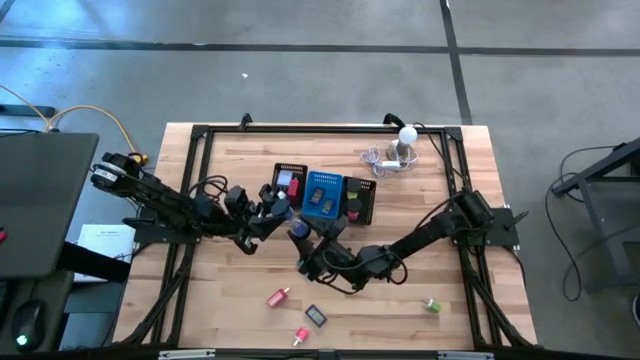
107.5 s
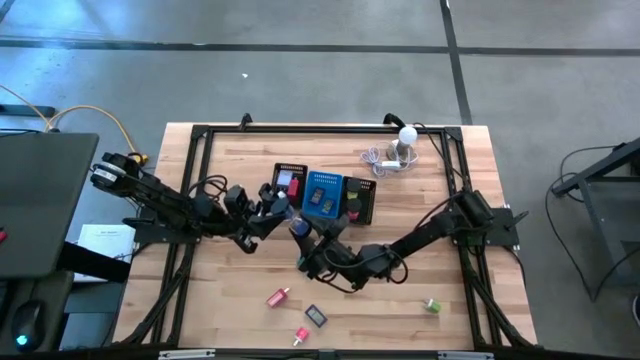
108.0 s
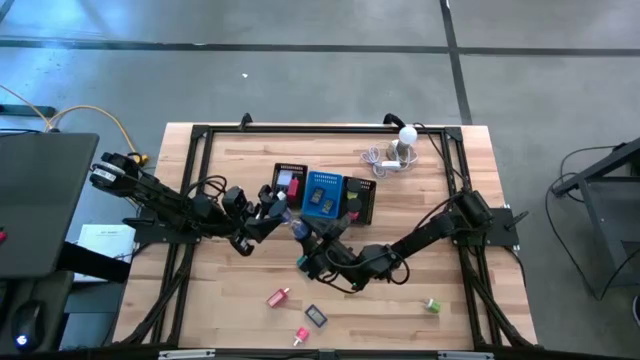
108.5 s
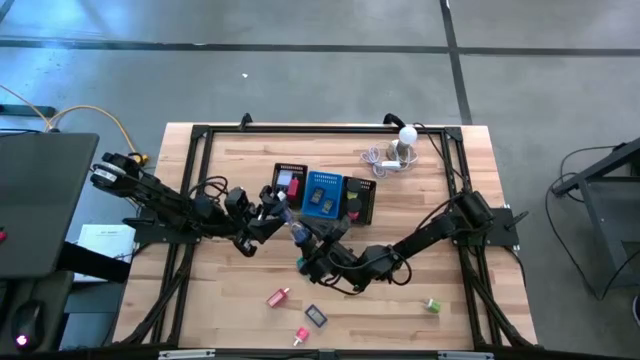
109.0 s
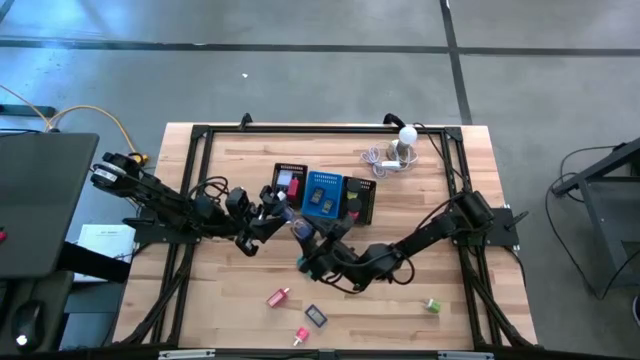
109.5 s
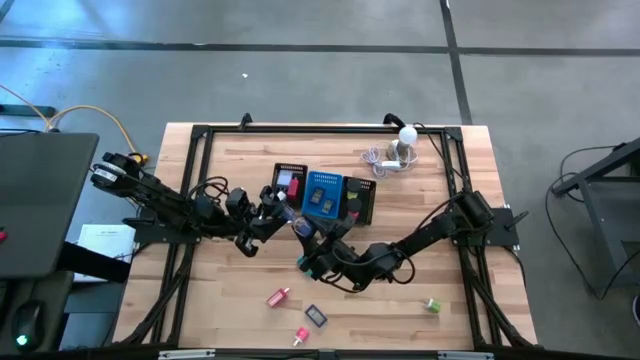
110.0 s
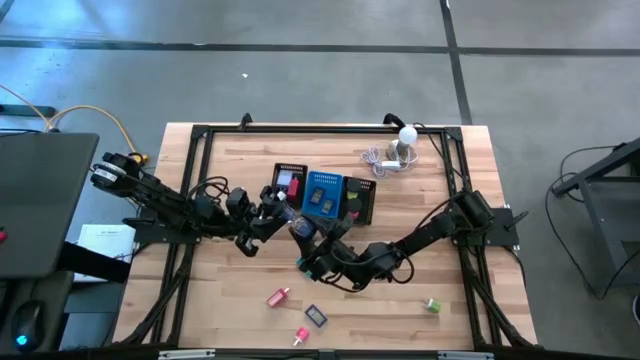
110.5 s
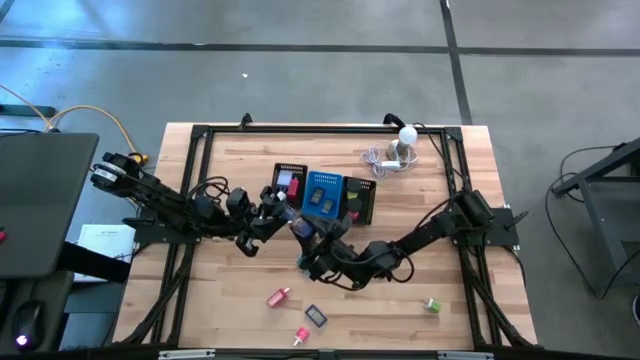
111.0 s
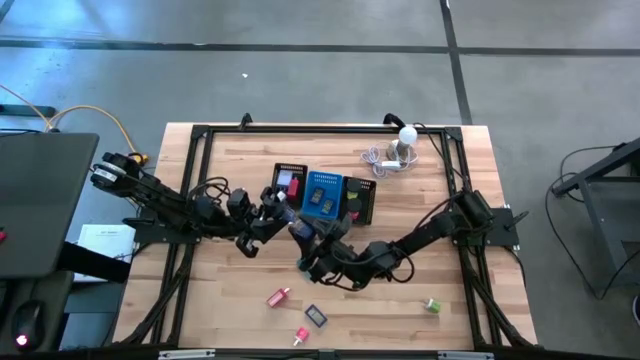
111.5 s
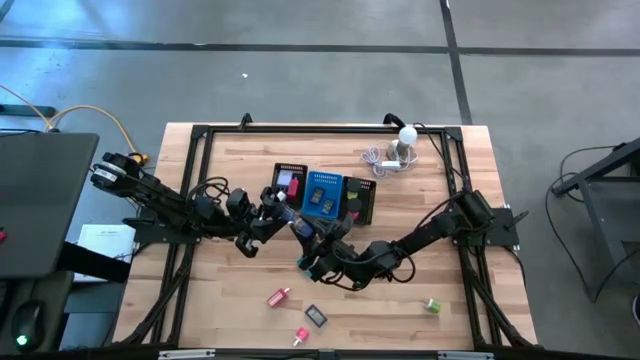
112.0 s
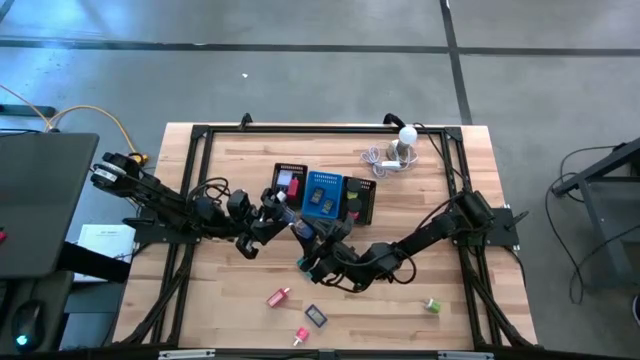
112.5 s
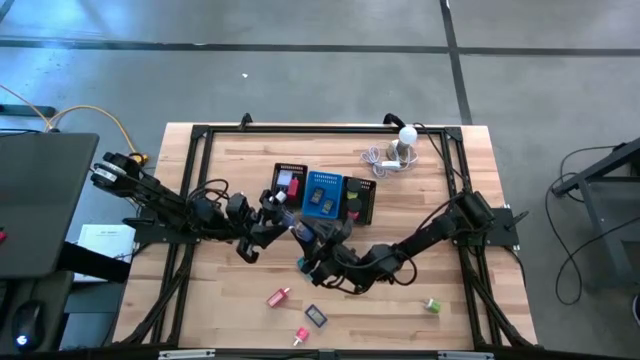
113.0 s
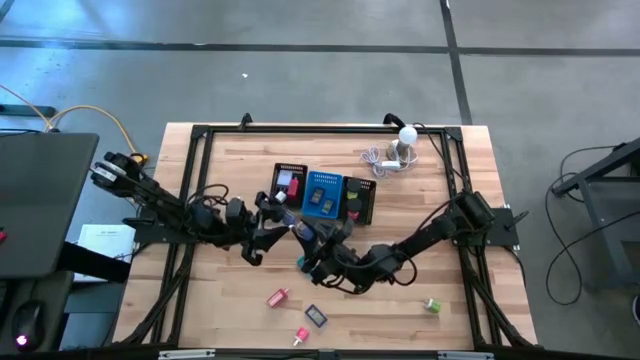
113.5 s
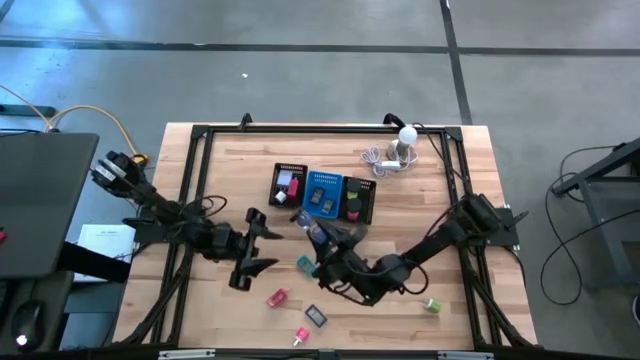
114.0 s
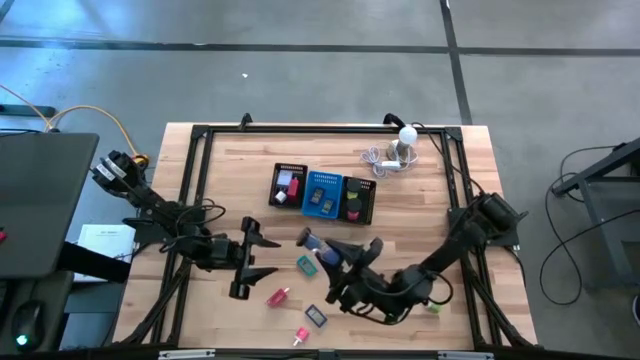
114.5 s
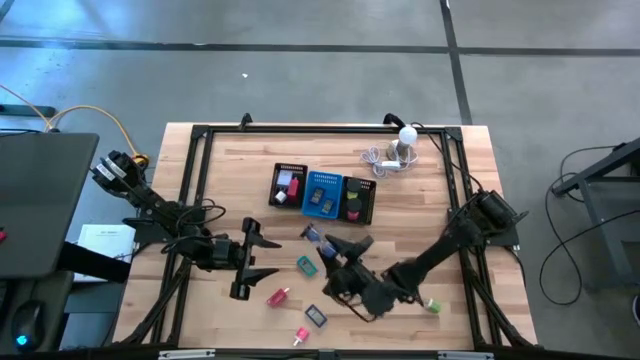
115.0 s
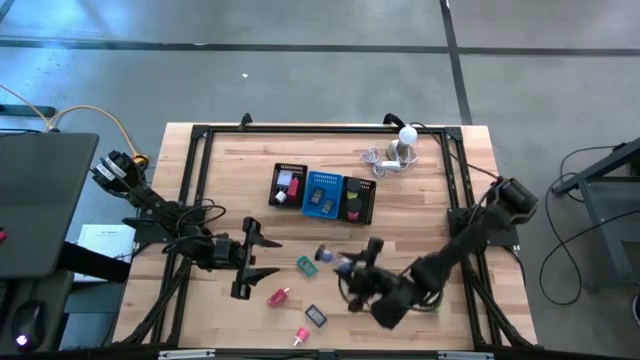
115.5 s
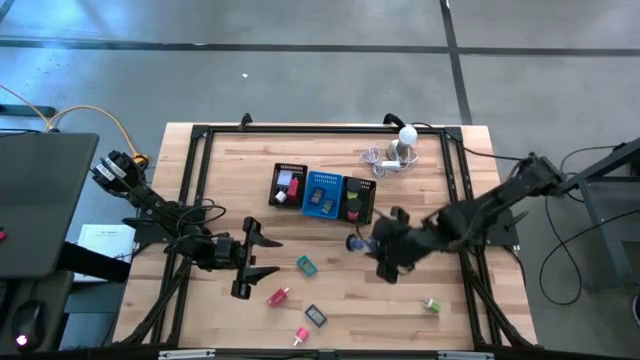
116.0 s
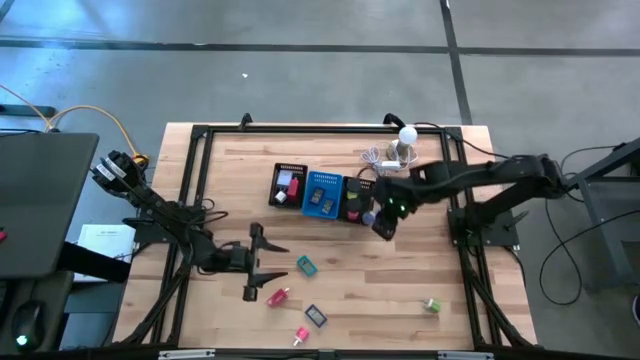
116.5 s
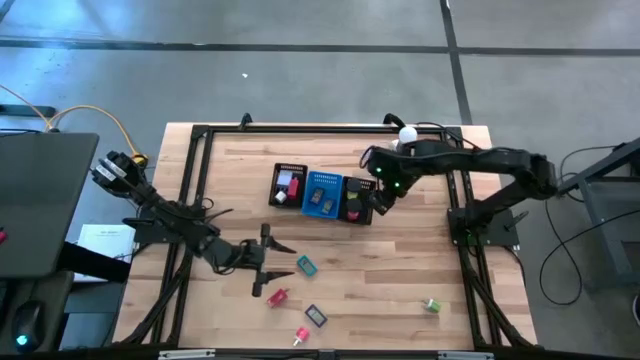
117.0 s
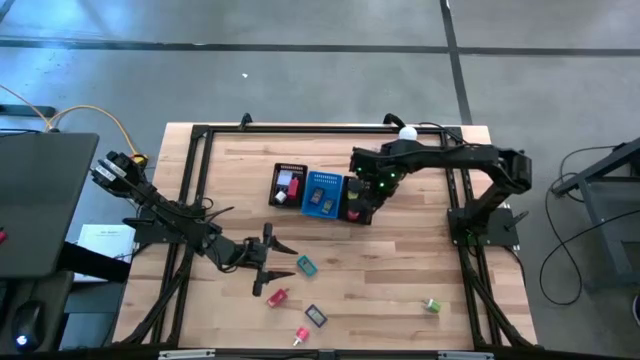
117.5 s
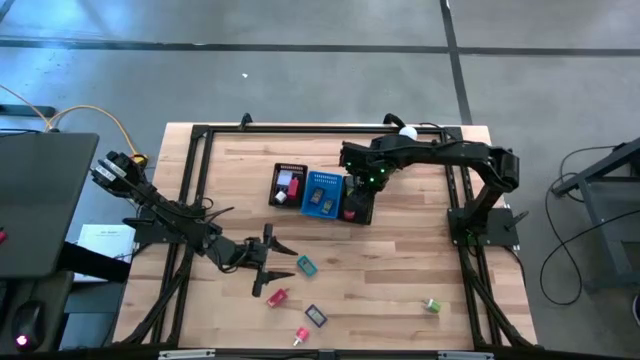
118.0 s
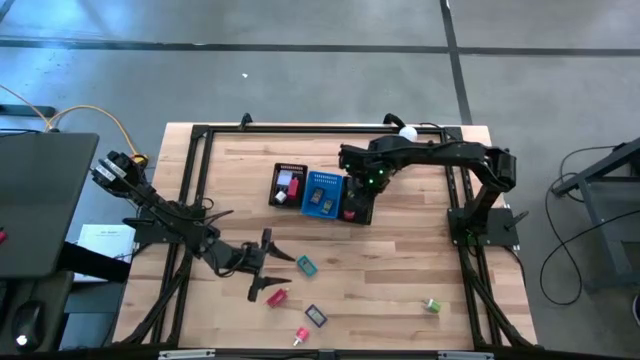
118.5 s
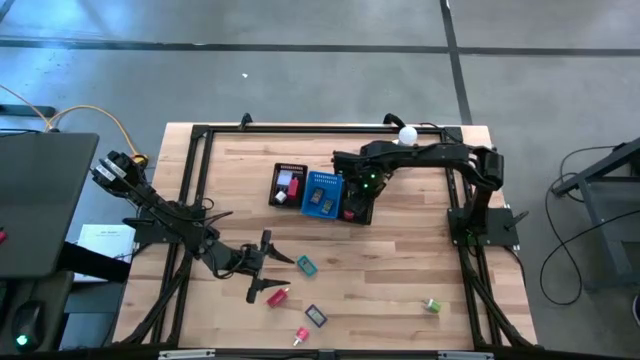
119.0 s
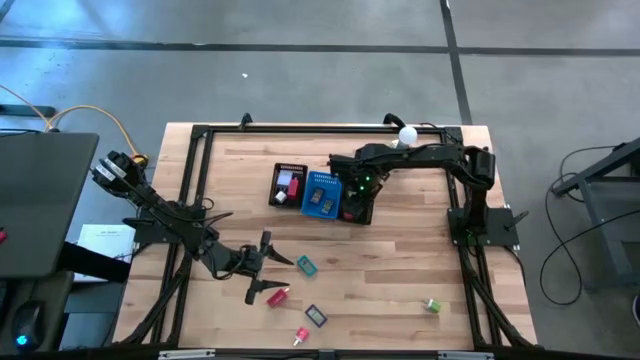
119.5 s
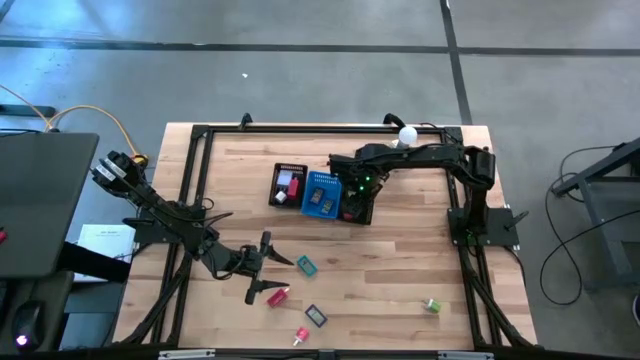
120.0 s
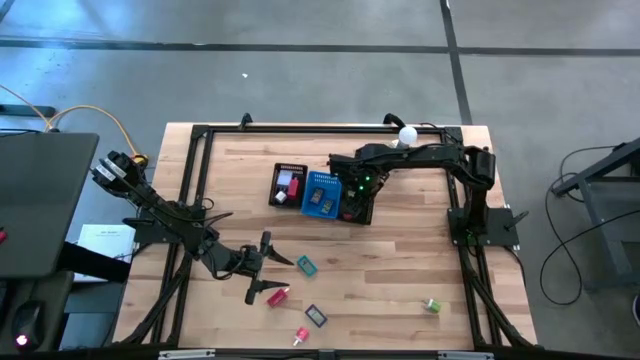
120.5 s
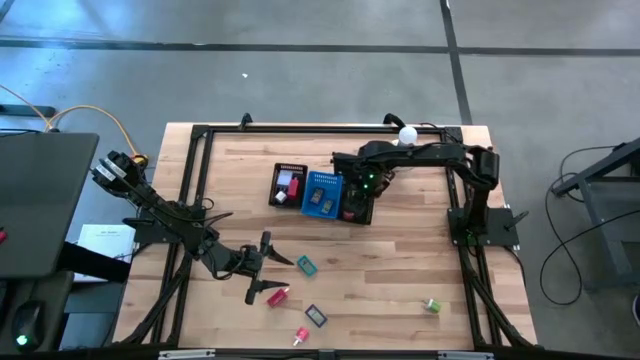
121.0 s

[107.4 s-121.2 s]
Task: Pick & Place Office items
Put the blue hour glass into the right black bin

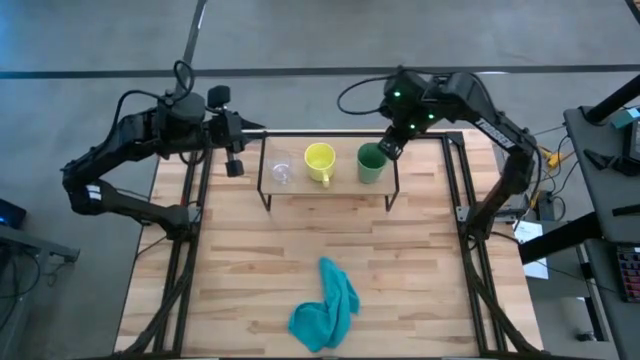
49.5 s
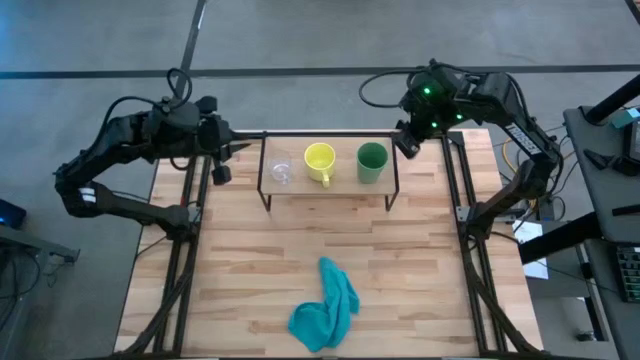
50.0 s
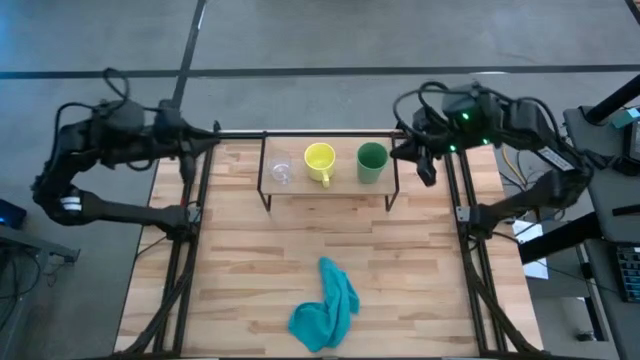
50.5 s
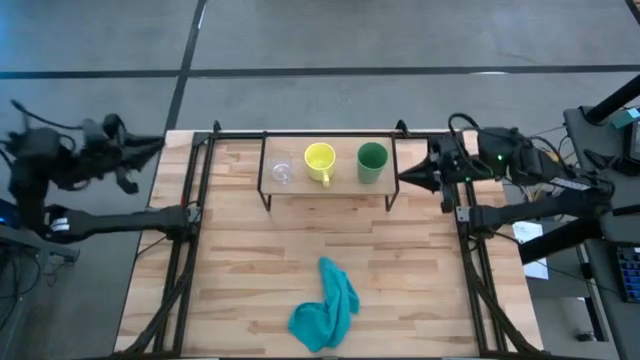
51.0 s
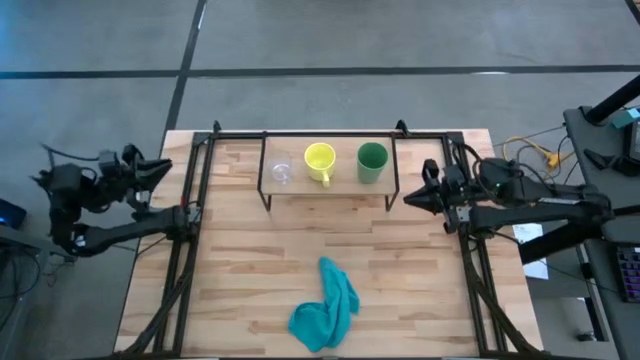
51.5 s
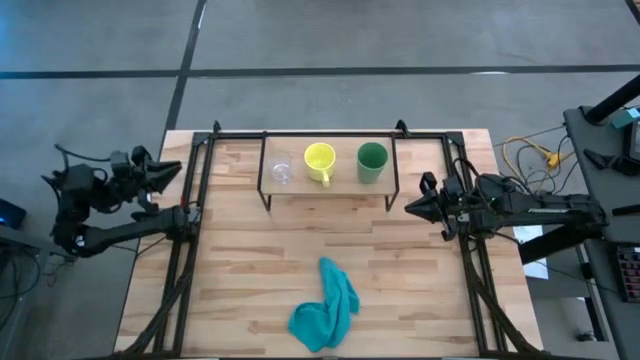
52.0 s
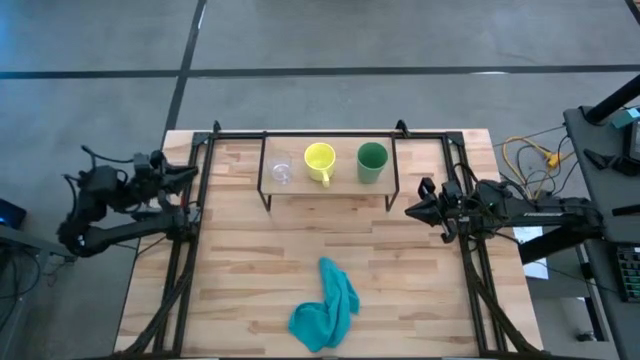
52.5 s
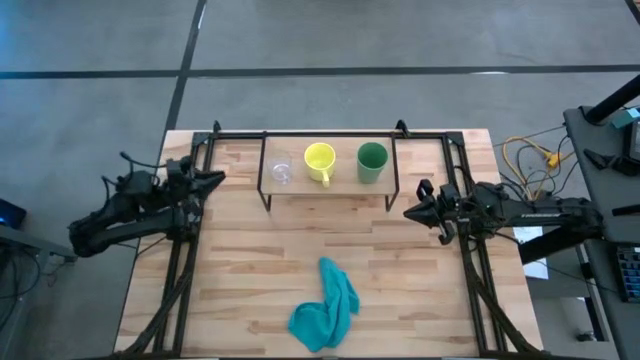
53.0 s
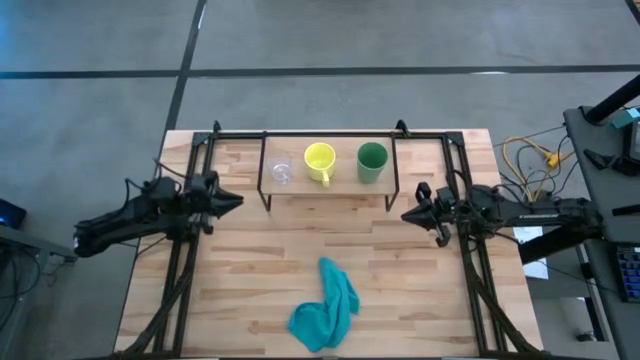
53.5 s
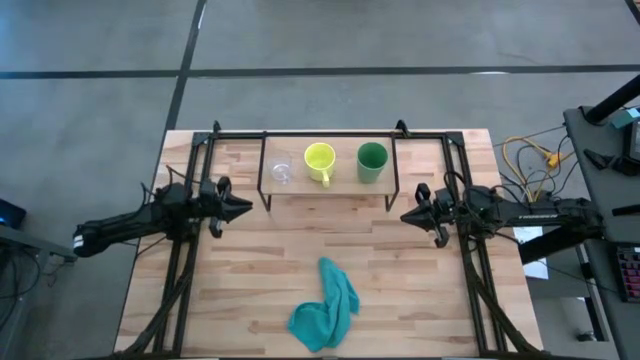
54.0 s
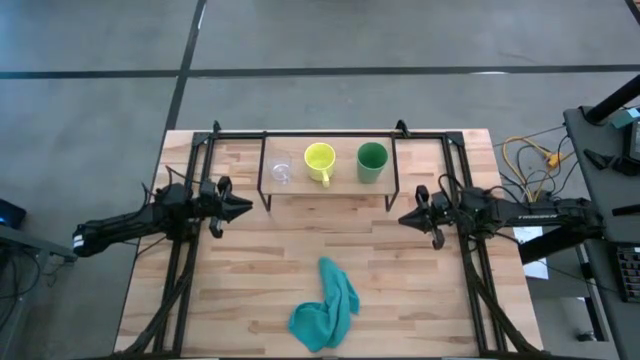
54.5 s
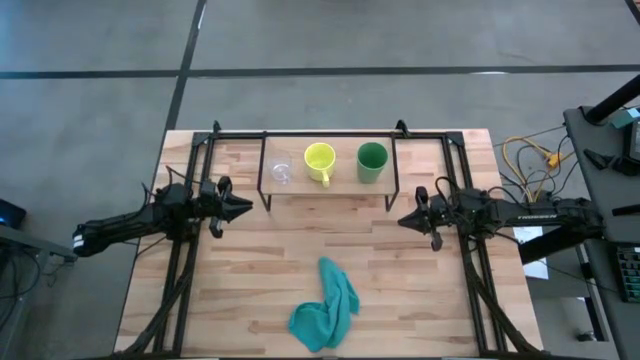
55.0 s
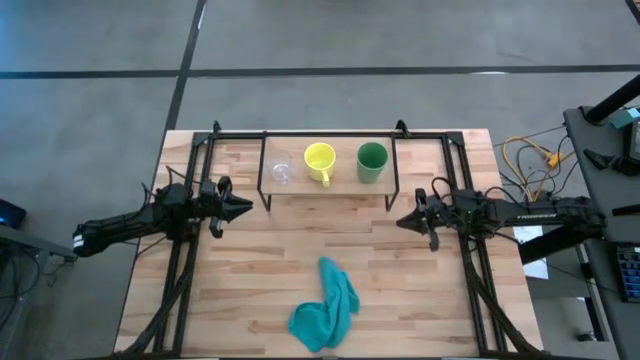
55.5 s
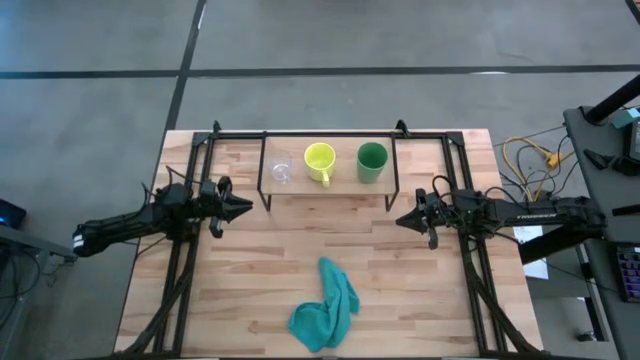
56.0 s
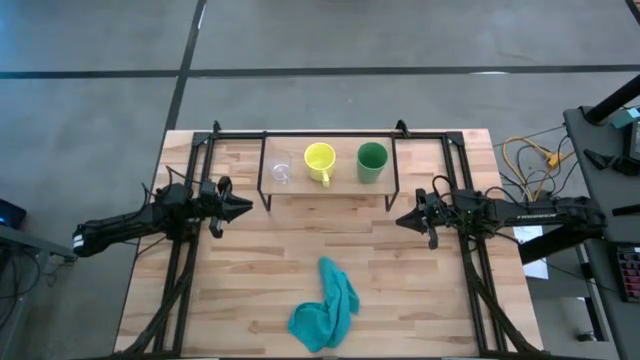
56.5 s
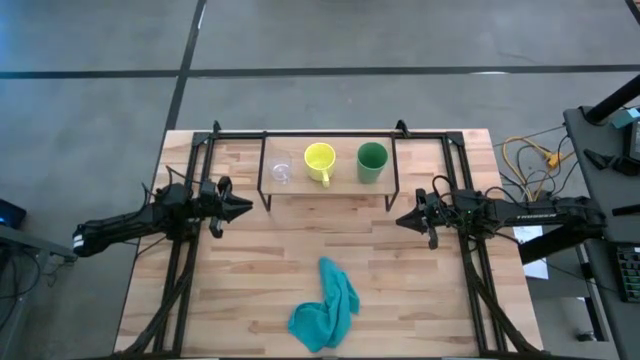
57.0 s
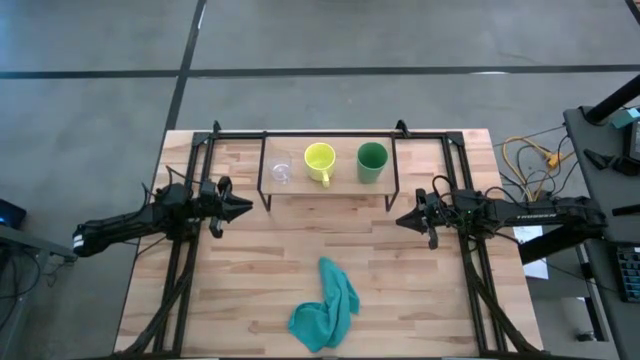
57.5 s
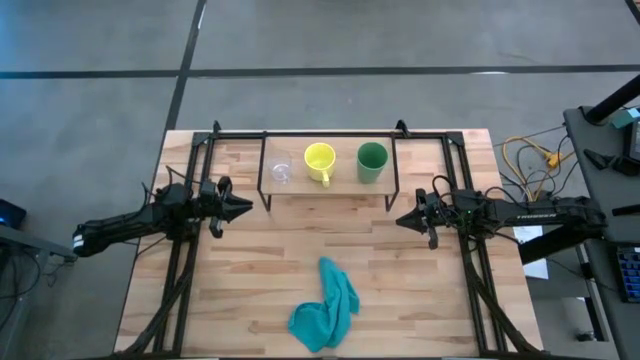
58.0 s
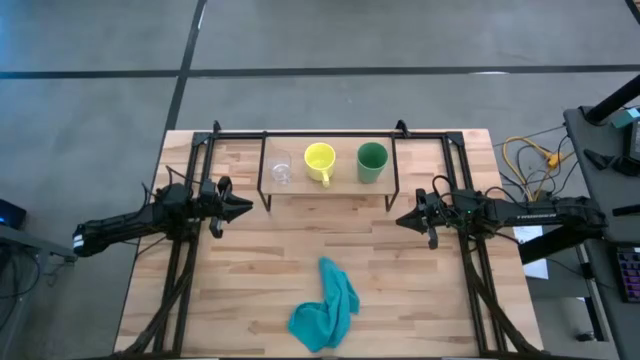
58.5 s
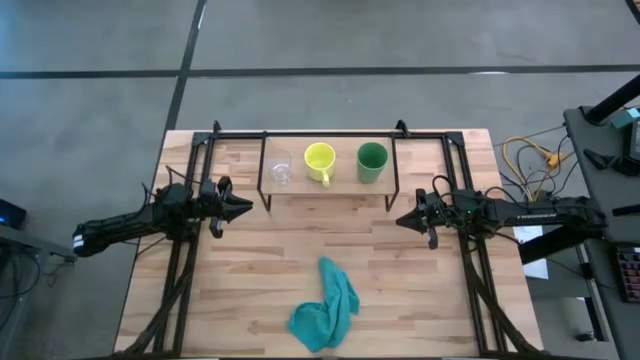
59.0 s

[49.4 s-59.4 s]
Task: Stack small to large cups/mugs on shelf
Return to Home Position
